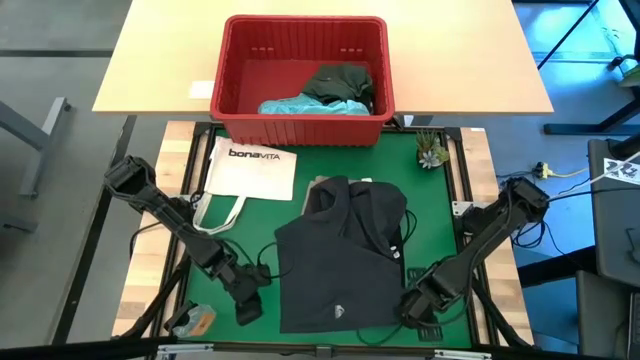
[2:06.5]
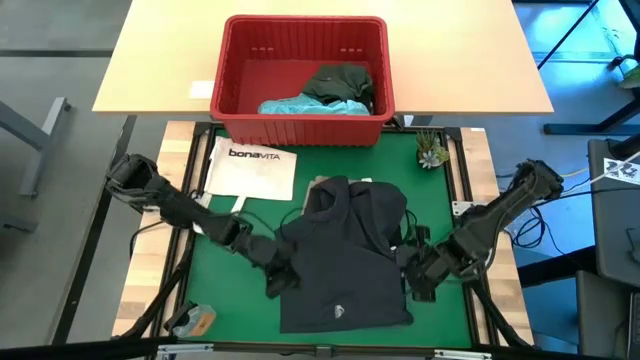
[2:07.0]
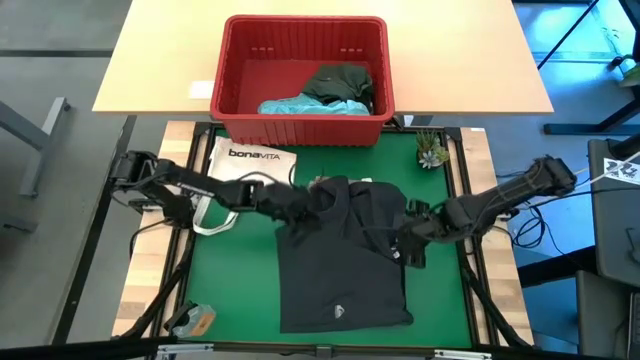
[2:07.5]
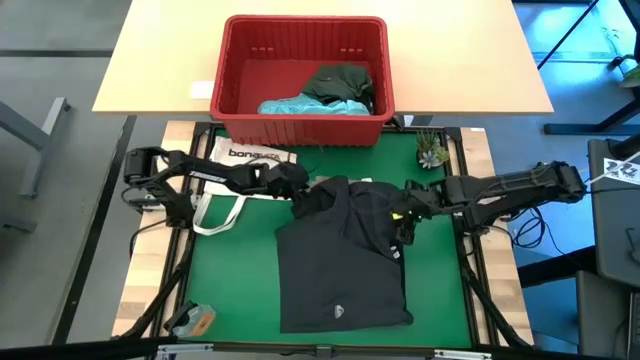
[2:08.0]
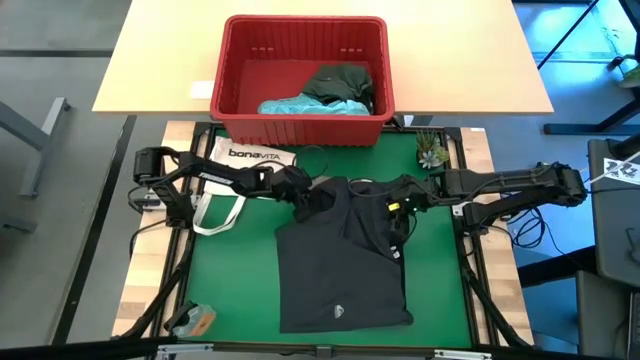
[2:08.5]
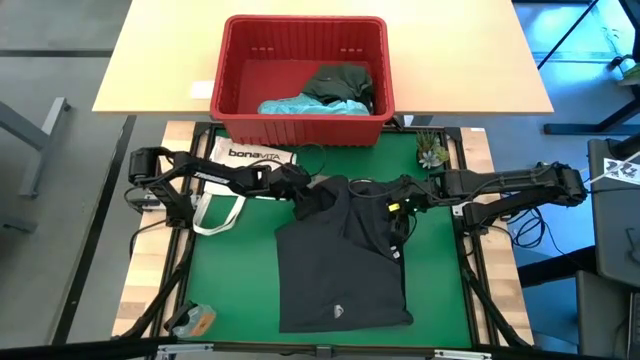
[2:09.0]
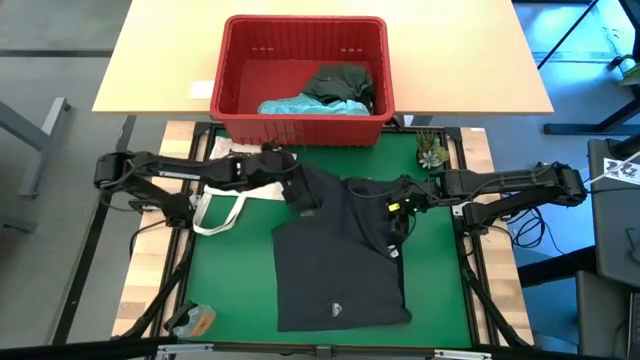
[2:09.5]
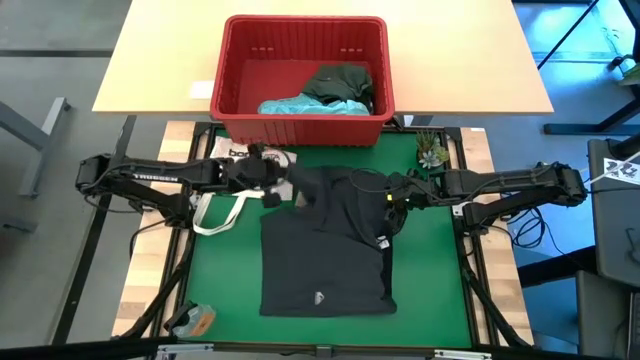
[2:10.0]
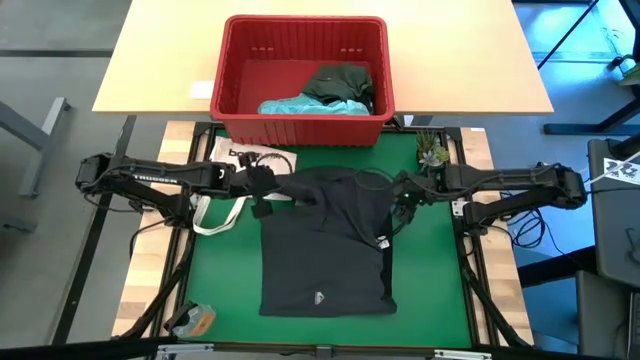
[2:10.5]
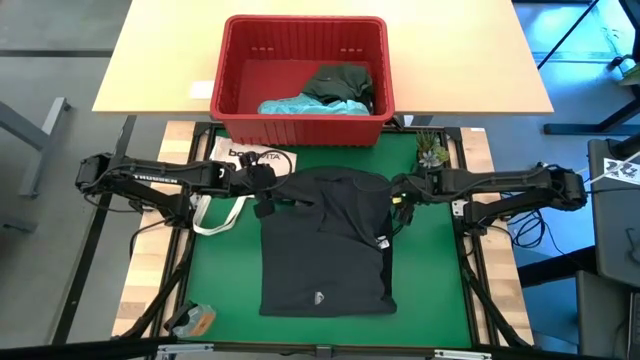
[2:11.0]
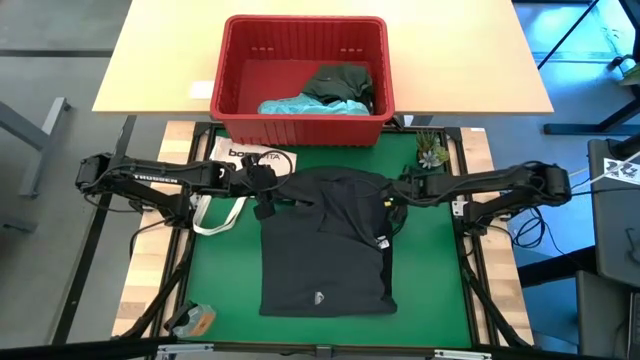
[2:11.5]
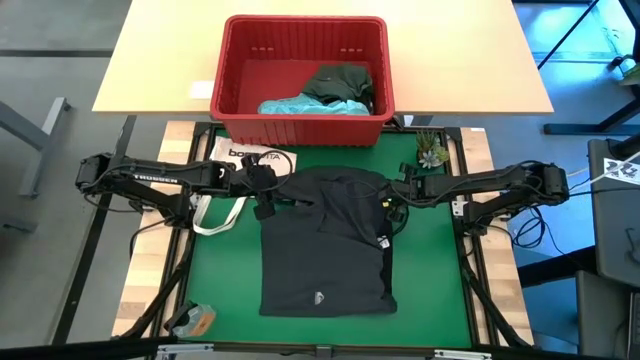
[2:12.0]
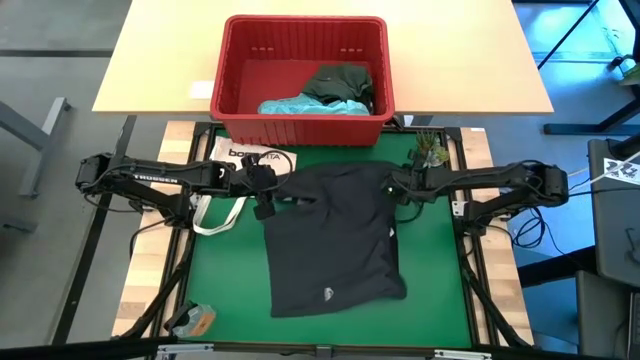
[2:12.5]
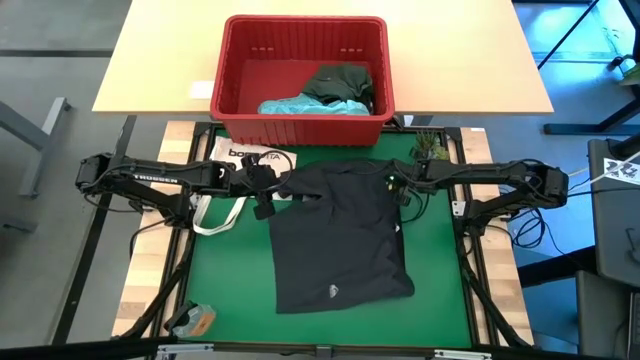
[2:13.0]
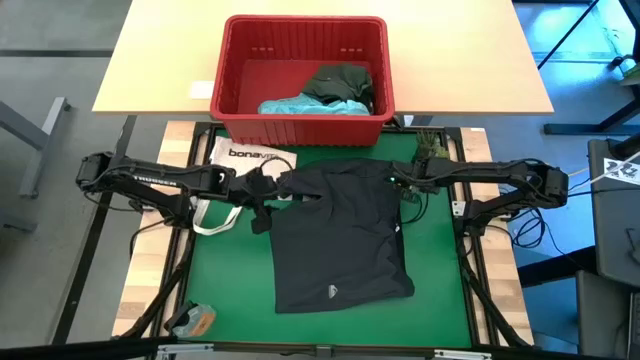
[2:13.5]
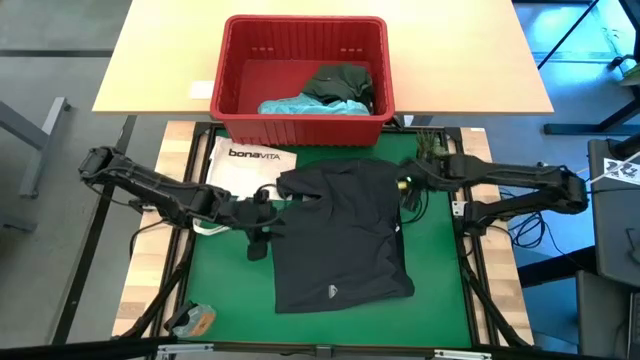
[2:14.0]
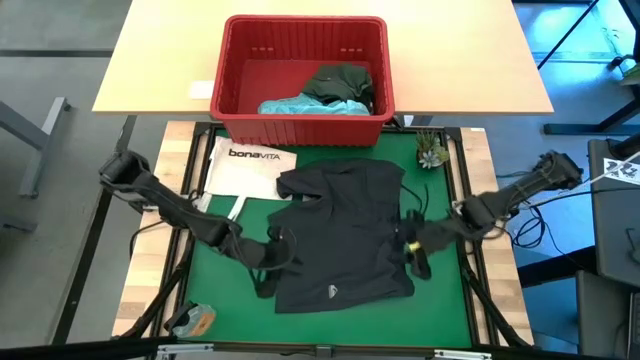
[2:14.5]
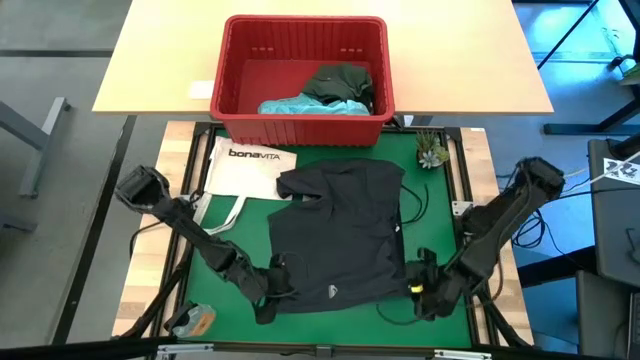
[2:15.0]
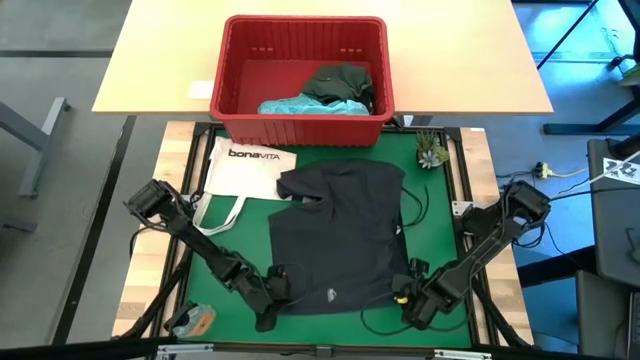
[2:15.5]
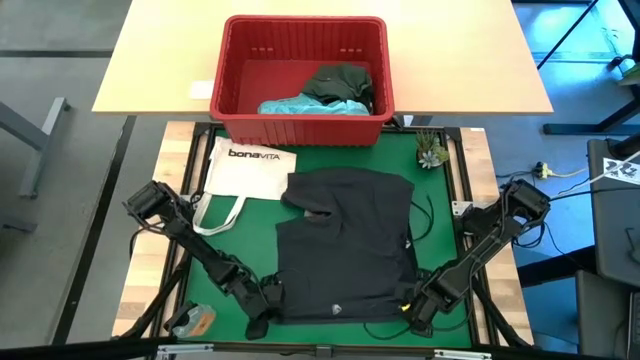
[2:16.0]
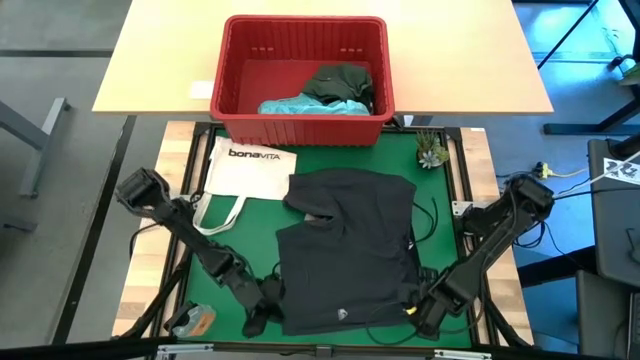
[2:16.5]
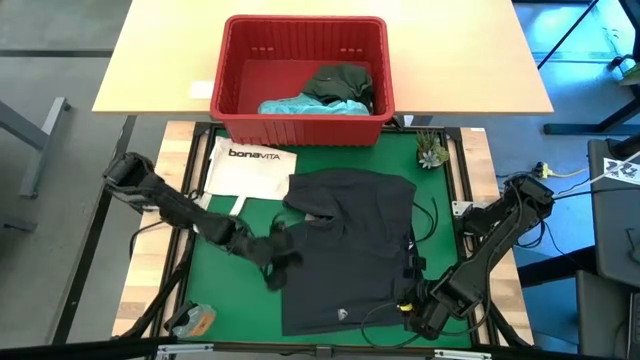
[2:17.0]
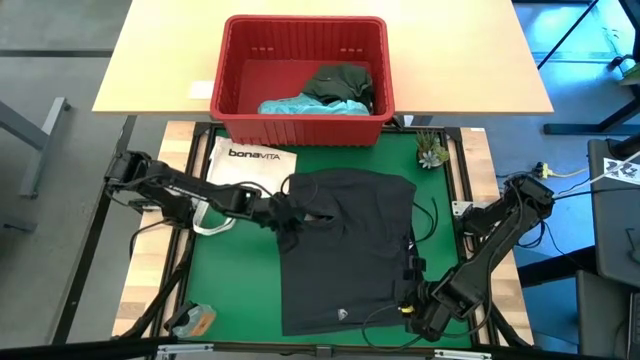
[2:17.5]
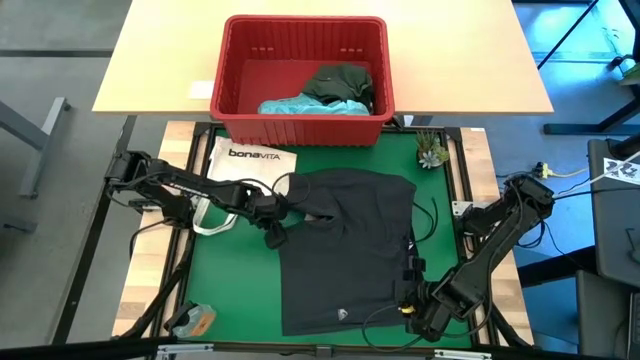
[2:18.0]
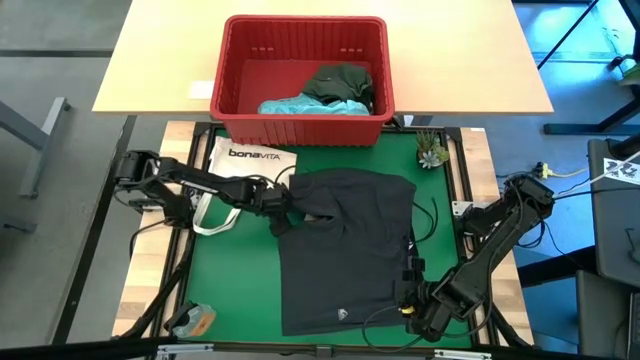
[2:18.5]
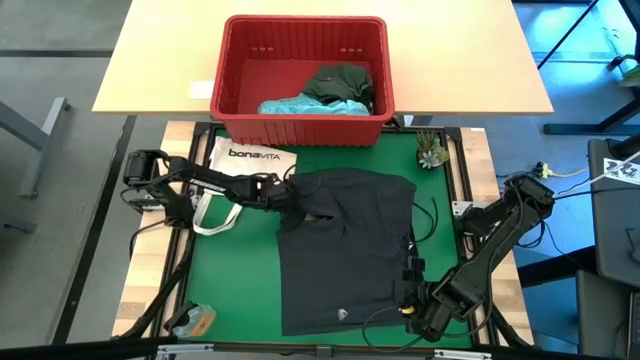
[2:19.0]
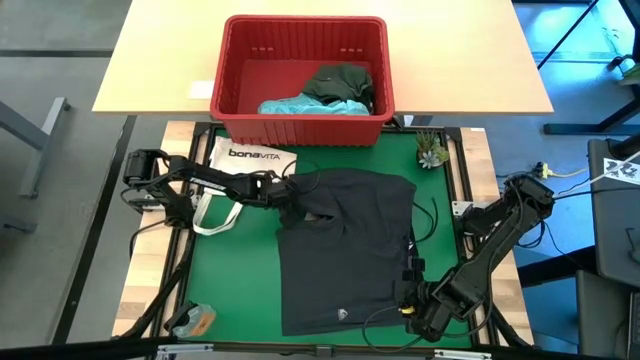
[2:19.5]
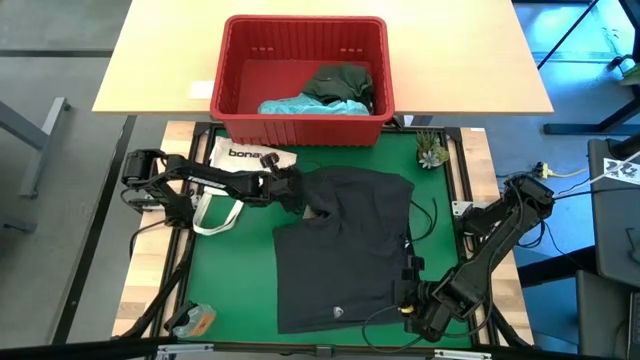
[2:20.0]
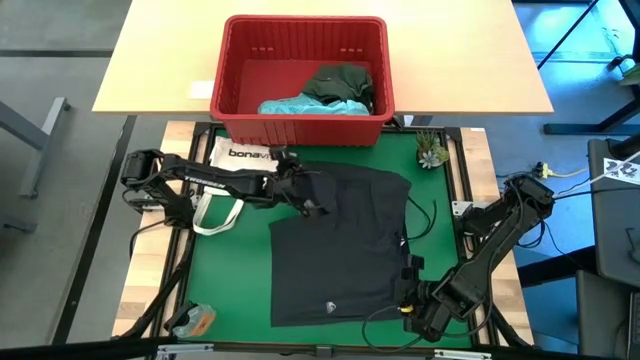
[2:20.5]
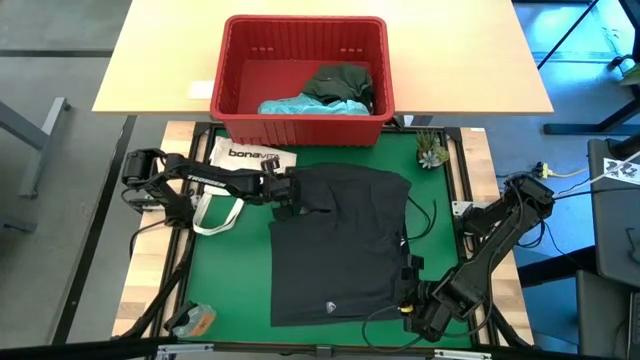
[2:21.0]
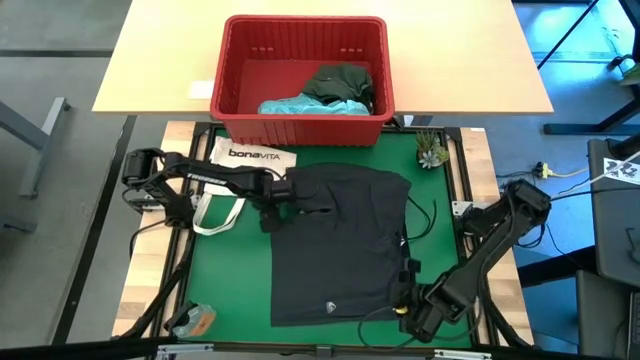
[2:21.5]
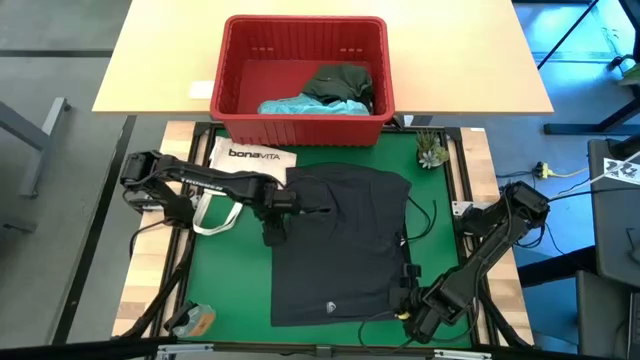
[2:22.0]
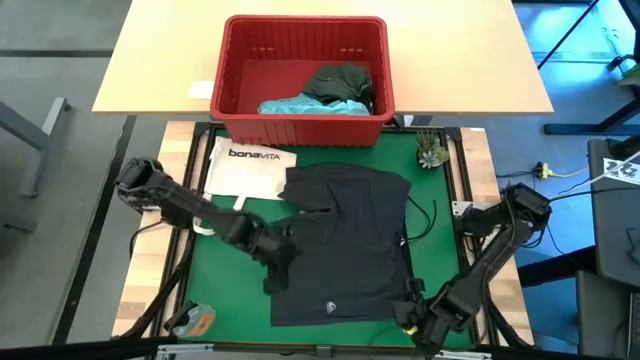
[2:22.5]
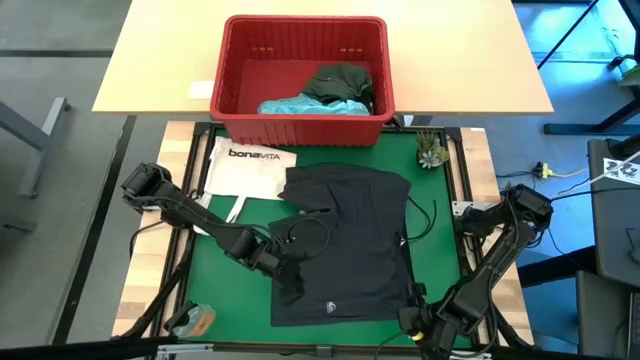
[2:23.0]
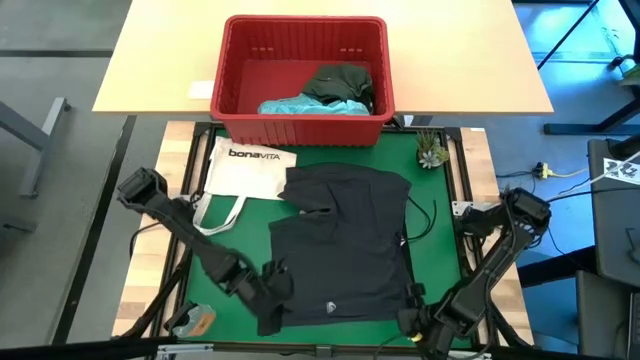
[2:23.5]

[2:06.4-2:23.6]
Task: Fold Laundry from Bin
Fold the black shorts from the red laundry bin

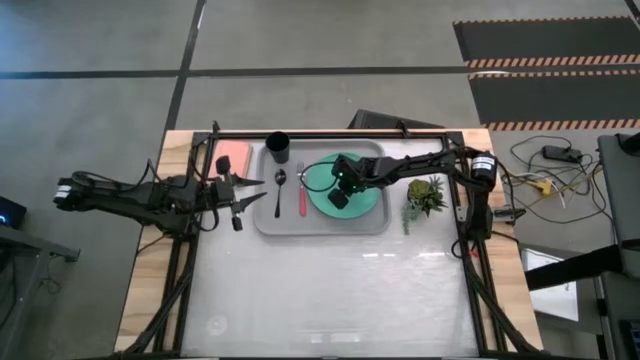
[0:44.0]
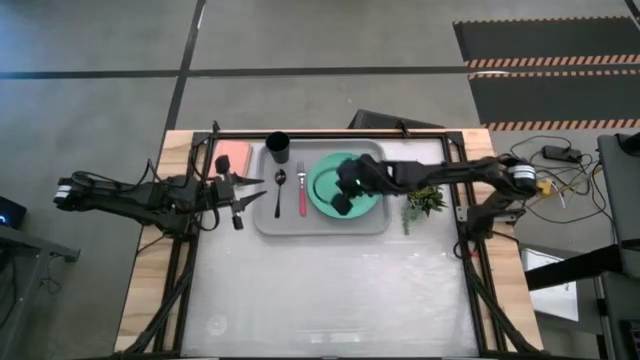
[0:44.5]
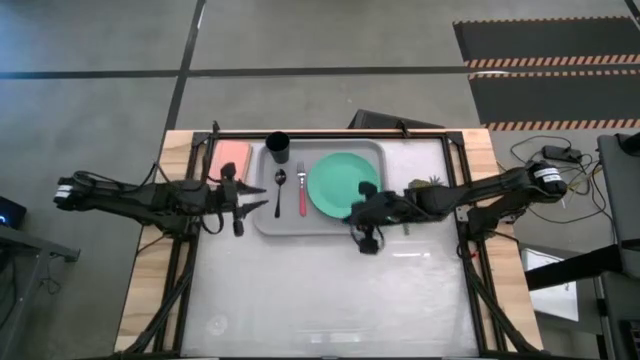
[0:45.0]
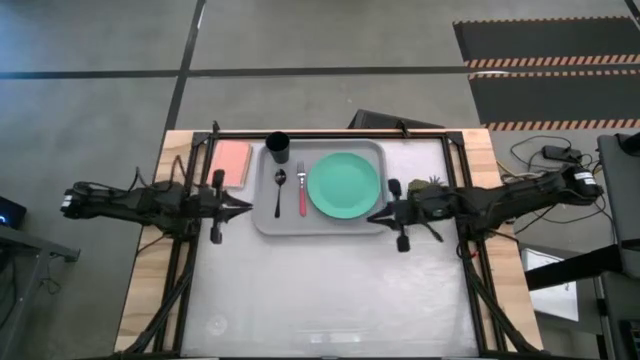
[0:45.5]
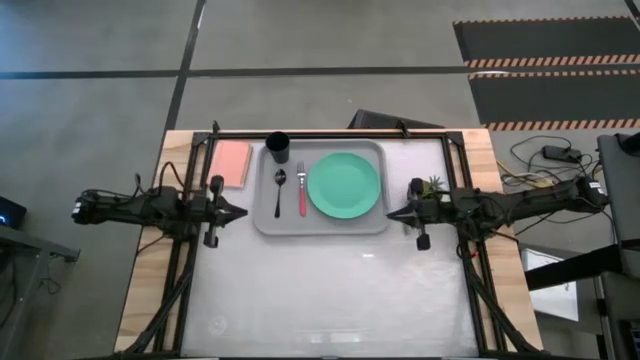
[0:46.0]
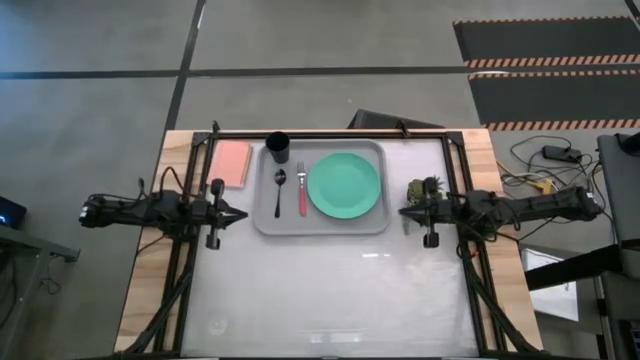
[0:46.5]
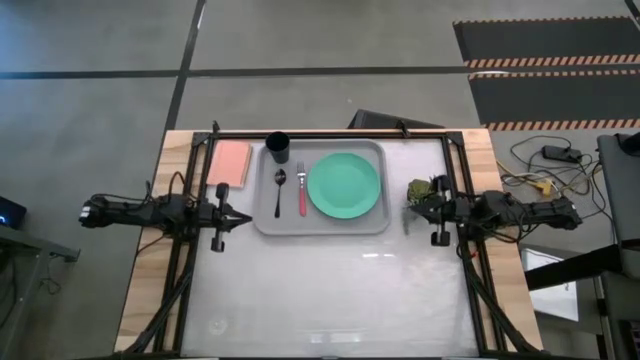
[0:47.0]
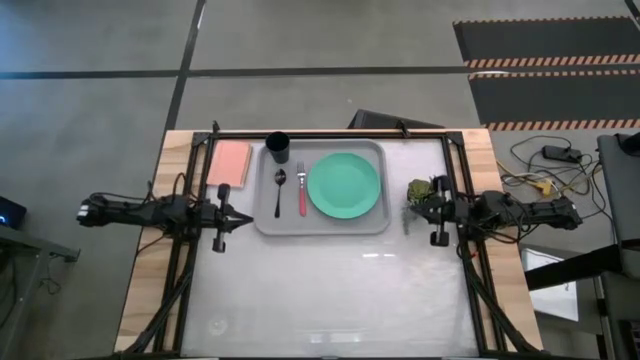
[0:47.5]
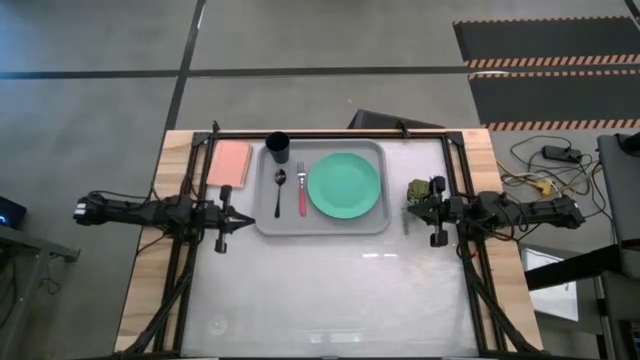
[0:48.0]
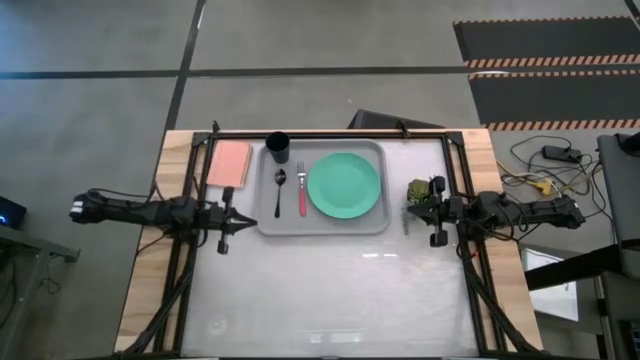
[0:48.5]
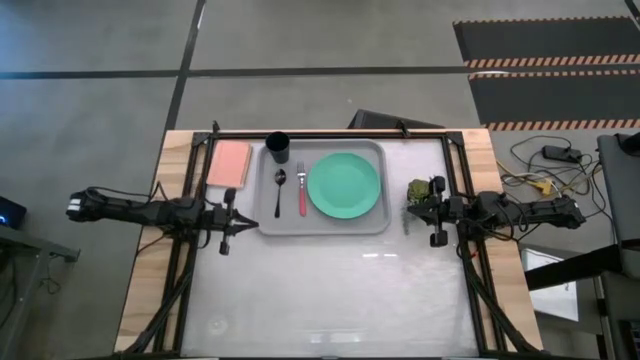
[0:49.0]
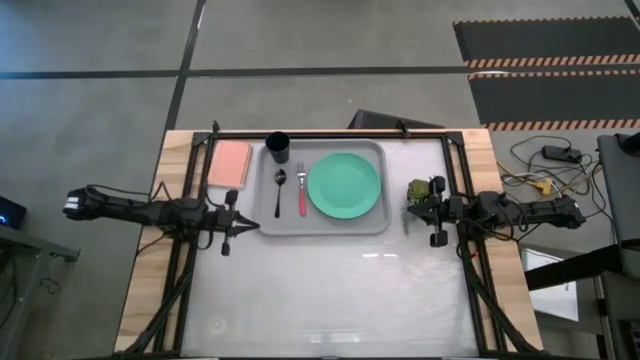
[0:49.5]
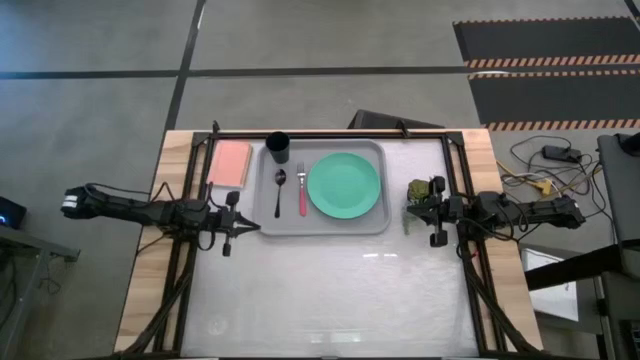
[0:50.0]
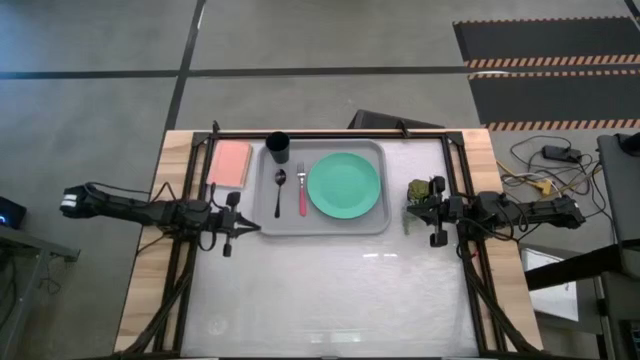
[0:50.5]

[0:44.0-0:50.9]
Task: Pick and place plate/cup/fork/spoon on tray
Return to Home Position
